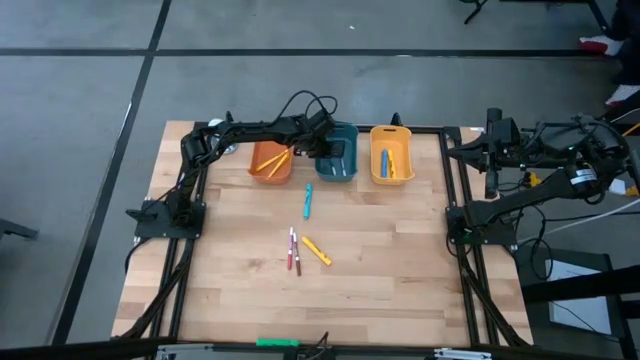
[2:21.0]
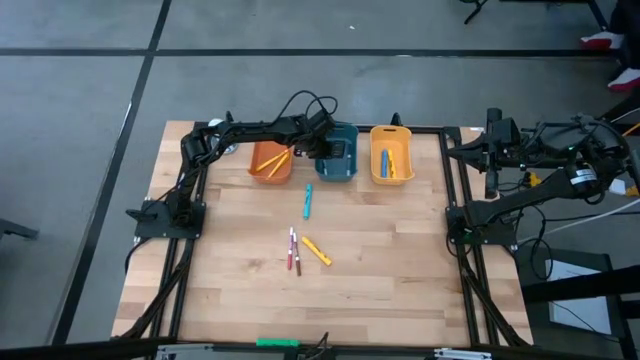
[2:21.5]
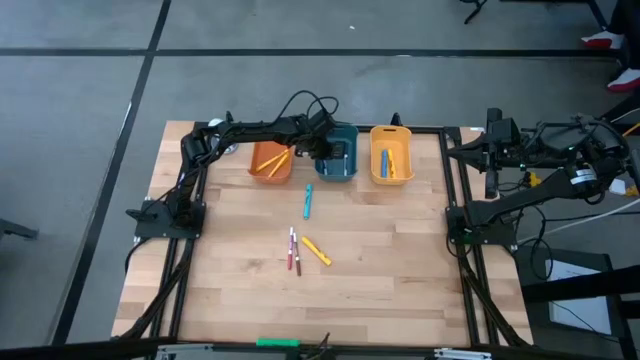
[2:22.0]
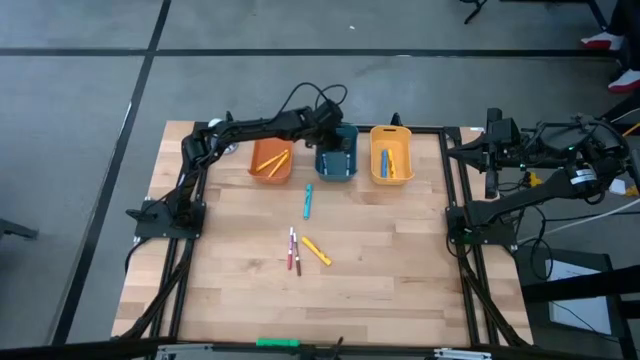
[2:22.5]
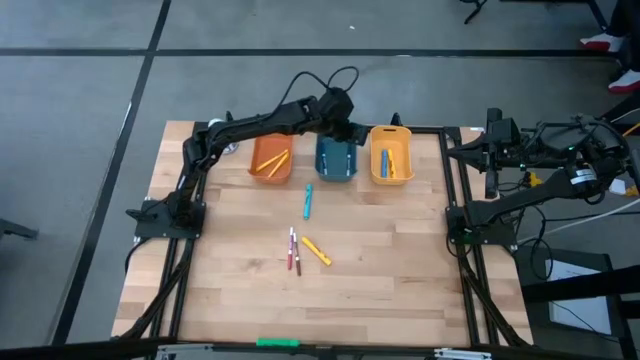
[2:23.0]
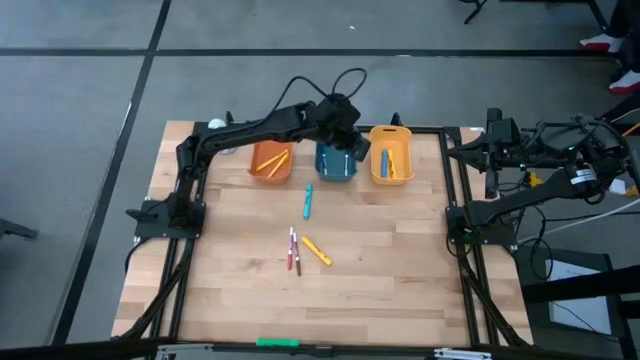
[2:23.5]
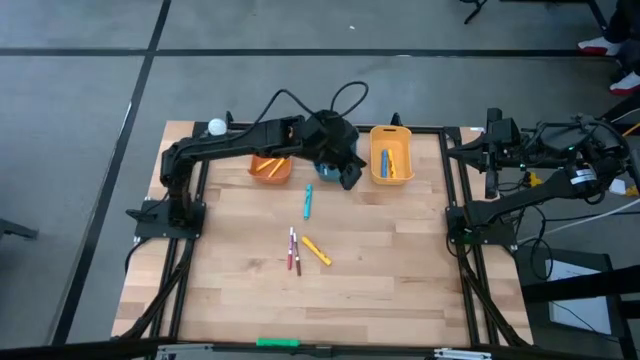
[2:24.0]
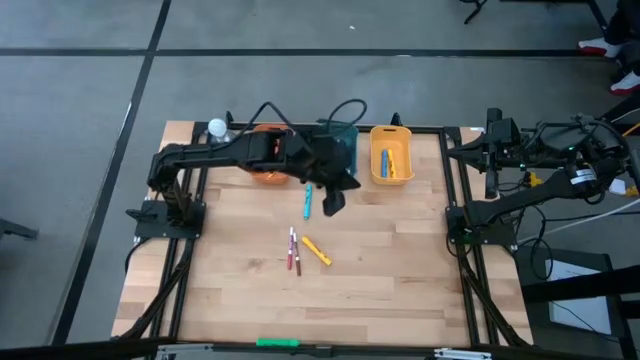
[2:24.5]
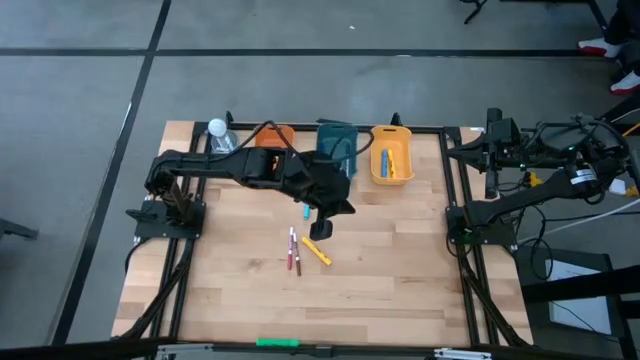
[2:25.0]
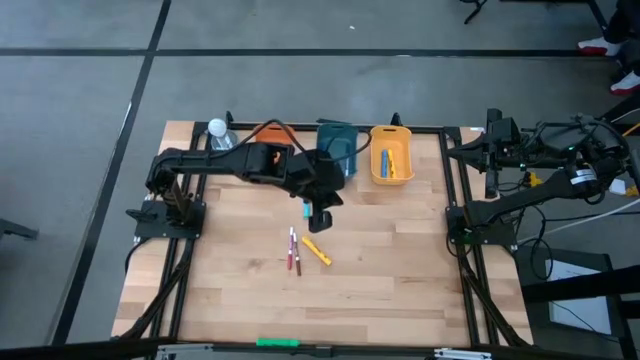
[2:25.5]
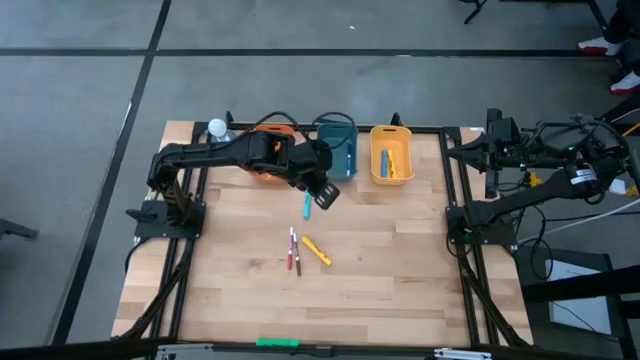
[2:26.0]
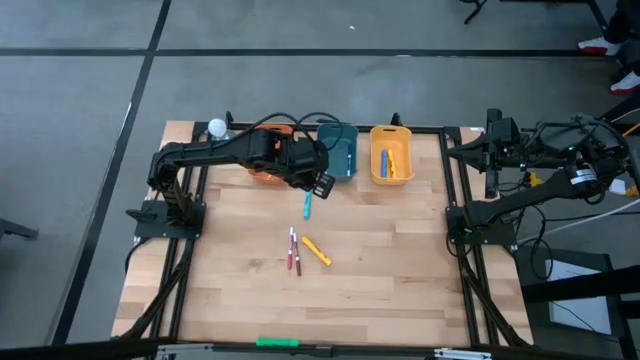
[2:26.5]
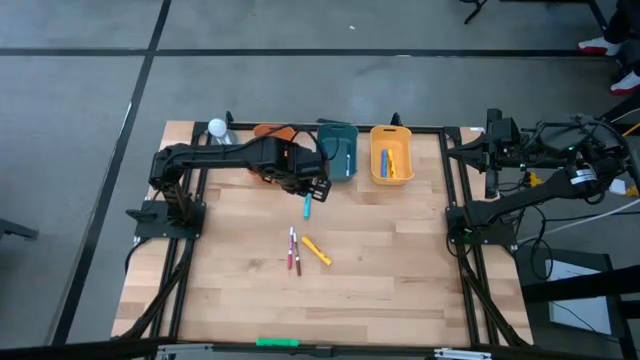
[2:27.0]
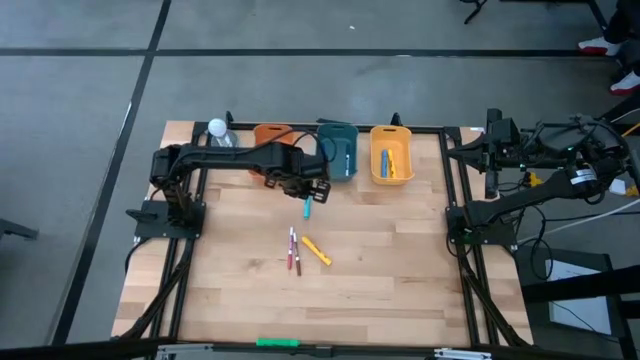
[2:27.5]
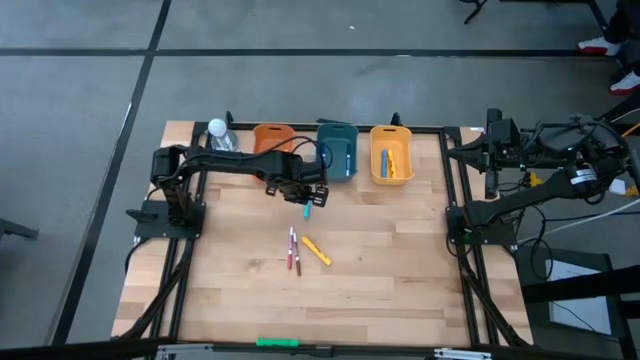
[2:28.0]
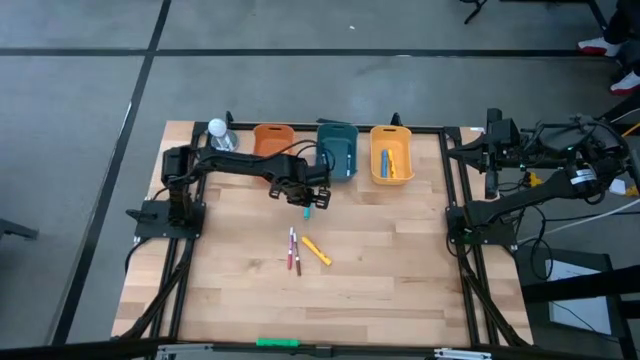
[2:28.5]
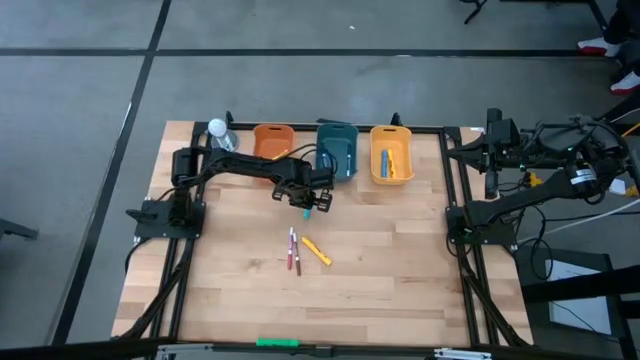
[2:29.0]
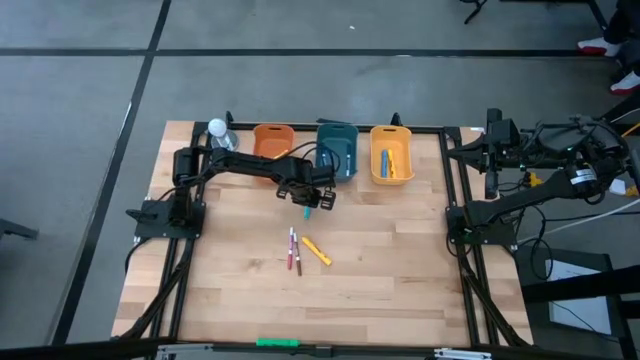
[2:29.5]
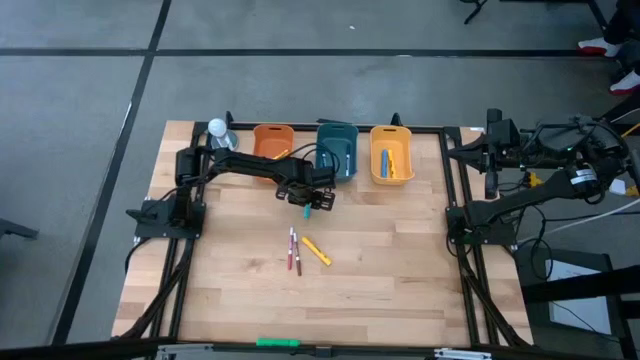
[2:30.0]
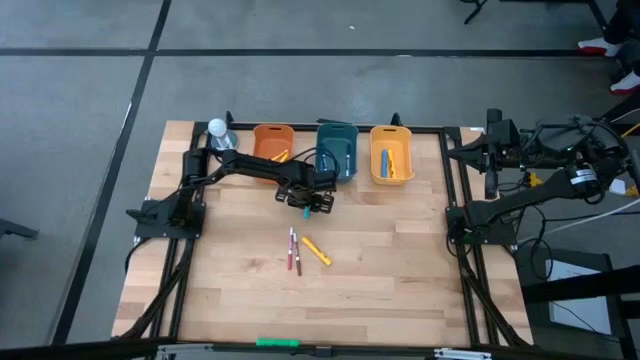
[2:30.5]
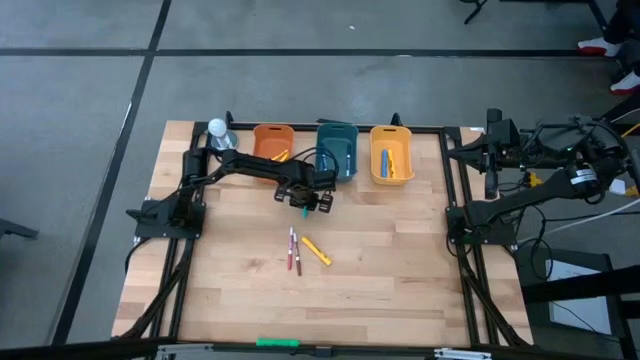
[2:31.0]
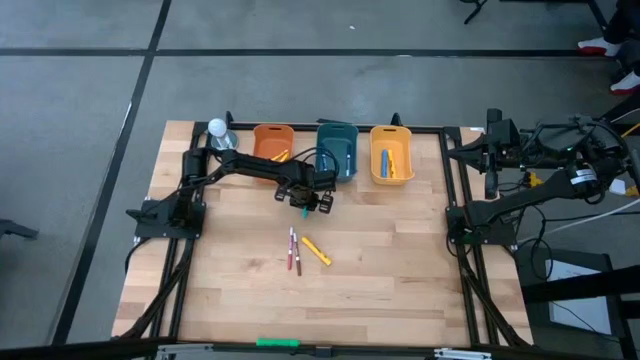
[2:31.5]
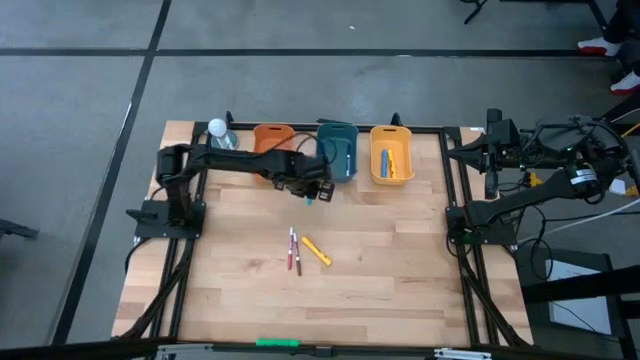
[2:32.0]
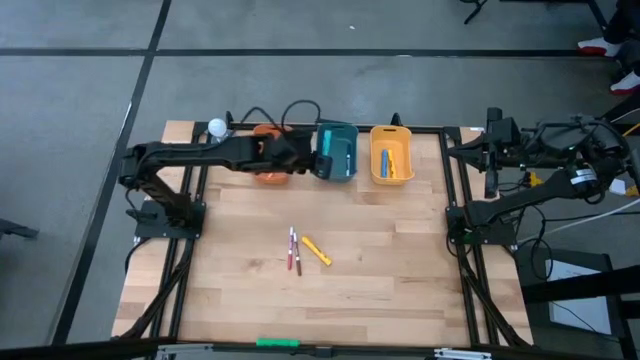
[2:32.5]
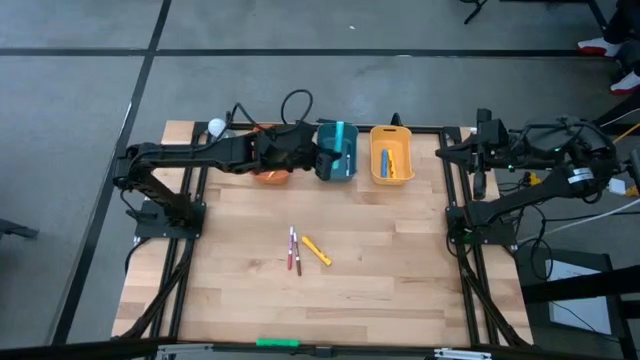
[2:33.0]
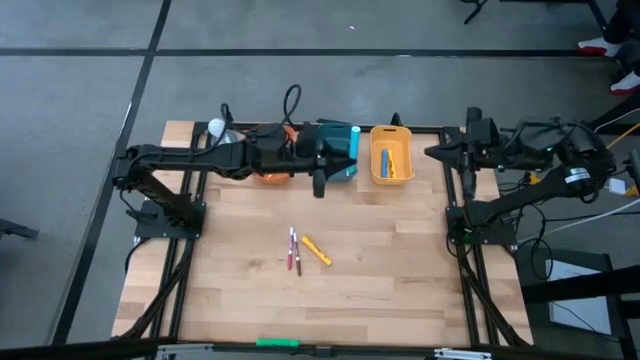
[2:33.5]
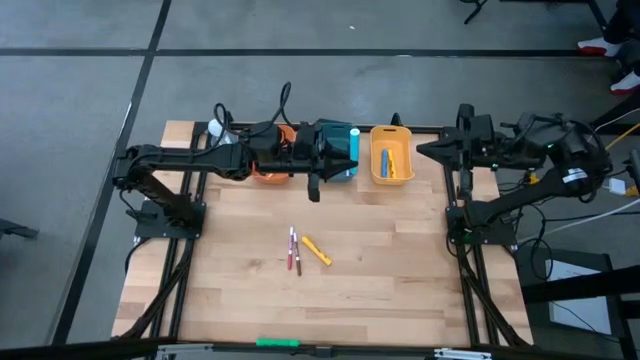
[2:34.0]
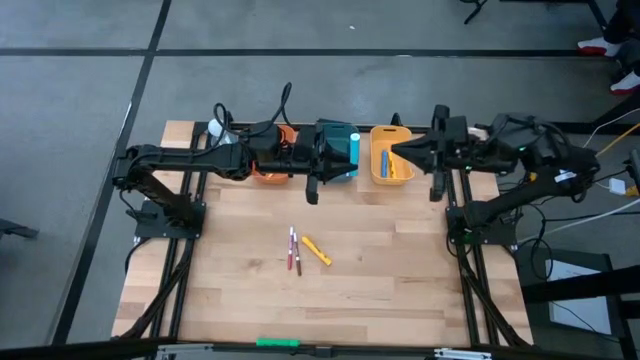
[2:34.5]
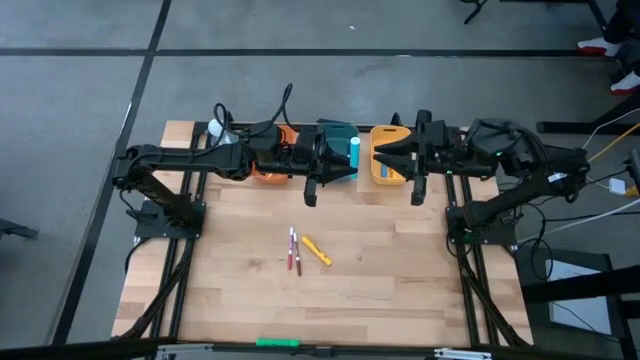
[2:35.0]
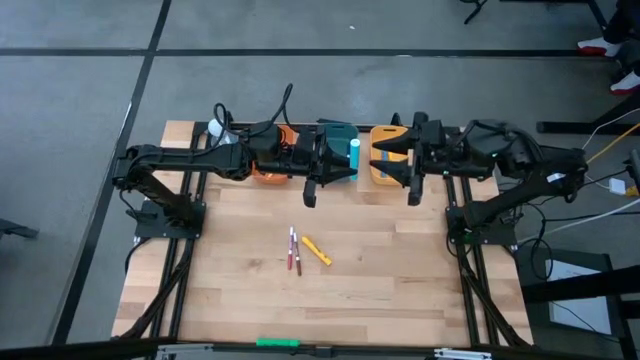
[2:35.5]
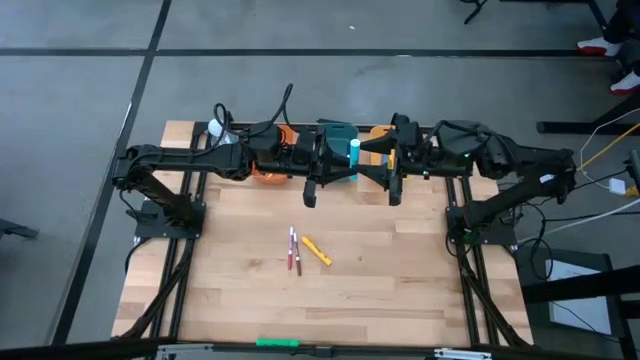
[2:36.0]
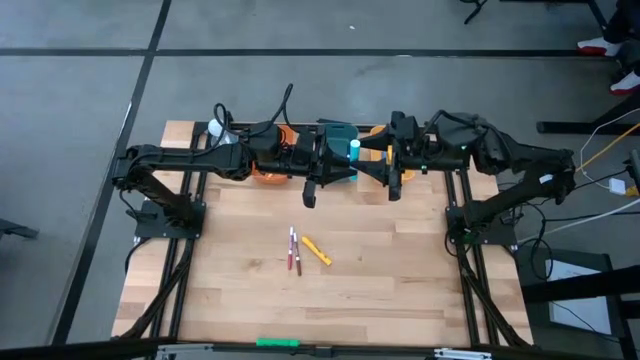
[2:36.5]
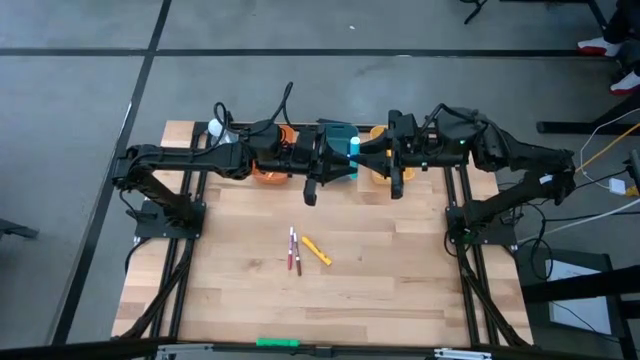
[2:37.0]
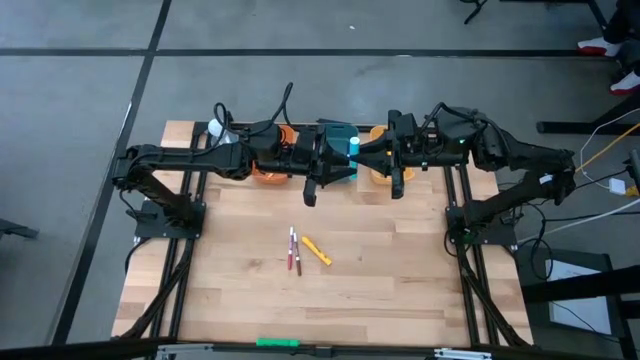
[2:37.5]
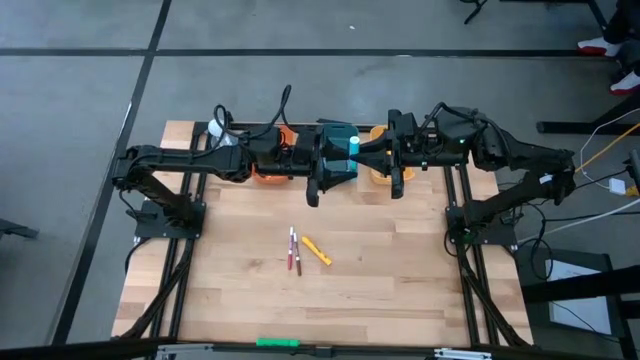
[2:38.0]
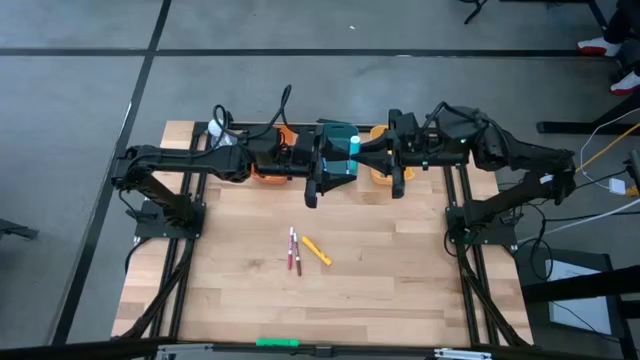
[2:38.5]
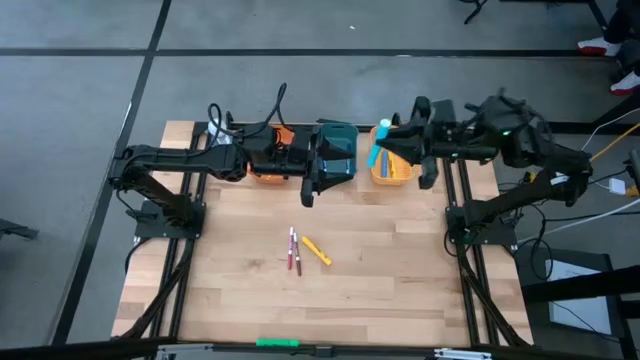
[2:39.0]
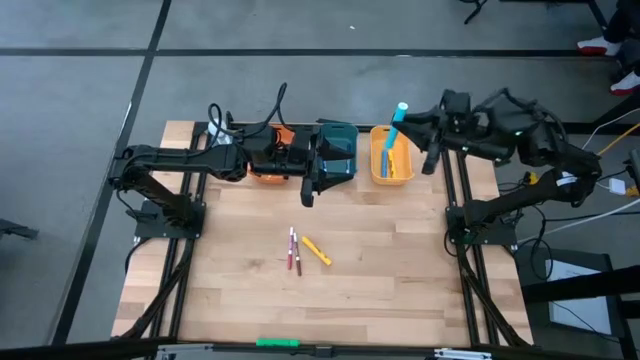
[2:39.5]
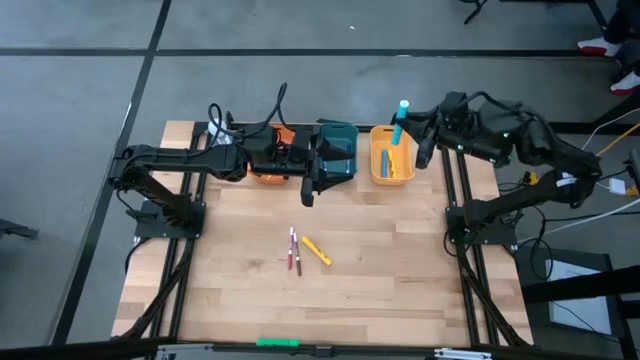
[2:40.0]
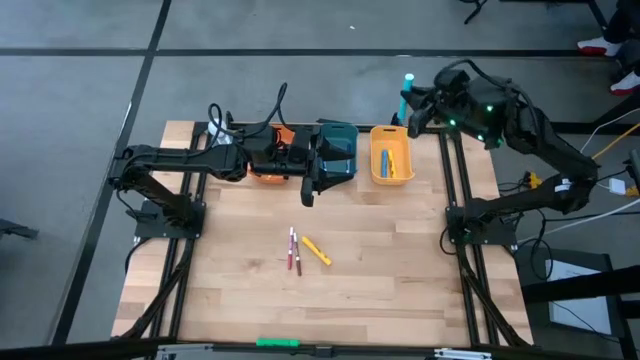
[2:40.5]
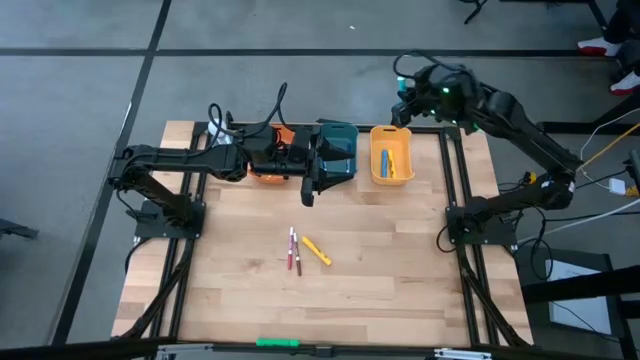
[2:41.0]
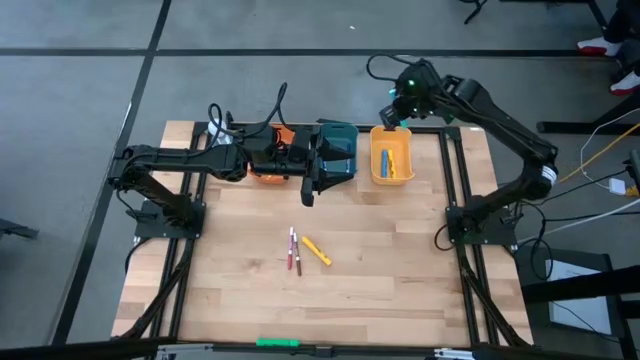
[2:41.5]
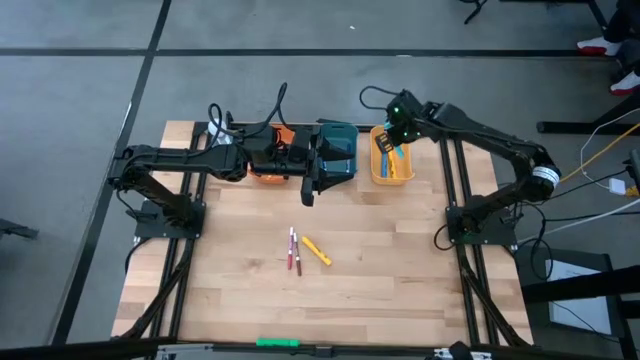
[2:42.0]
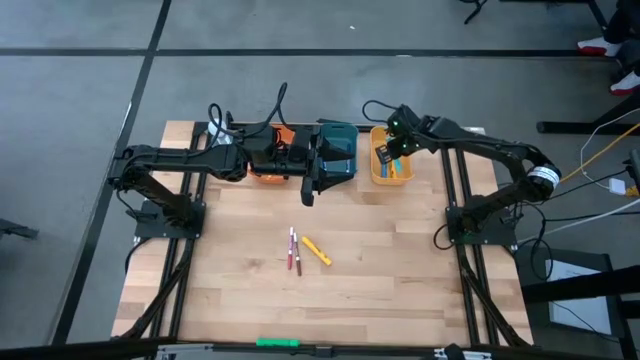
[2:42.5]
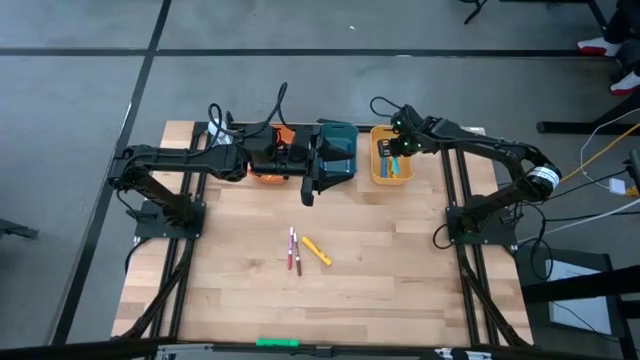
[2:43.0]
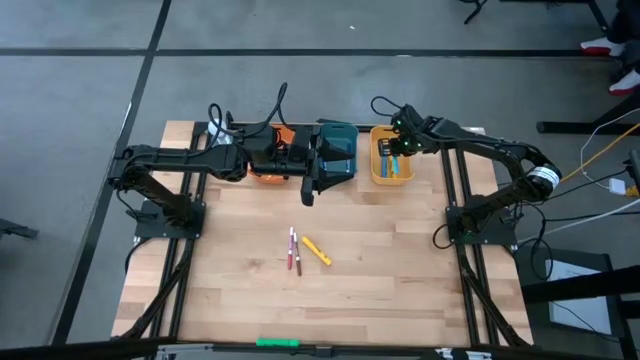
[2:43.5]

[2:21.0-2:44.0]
Task: Pick & Place Markers
Put the light blue highlighter pen into the yellow bin
